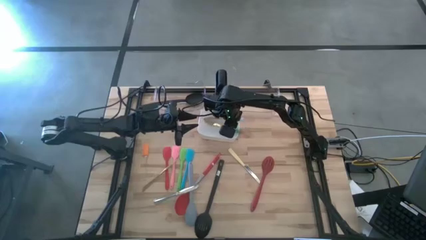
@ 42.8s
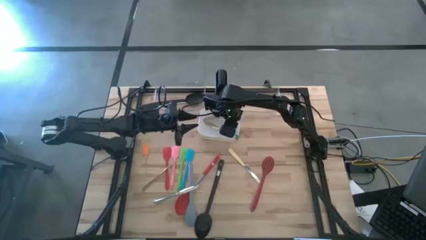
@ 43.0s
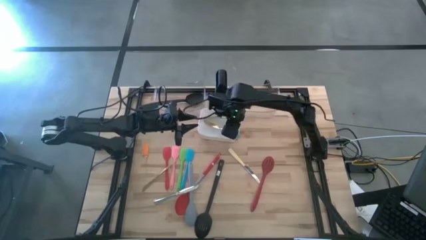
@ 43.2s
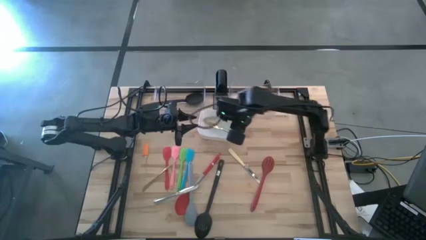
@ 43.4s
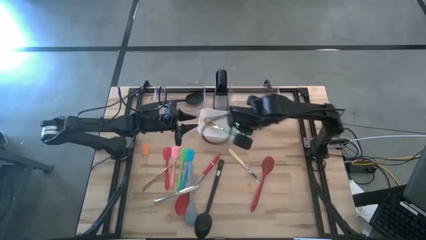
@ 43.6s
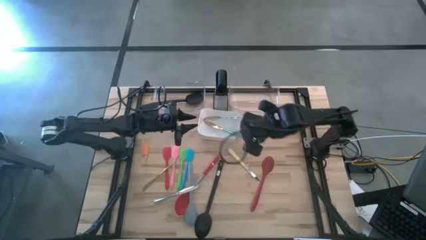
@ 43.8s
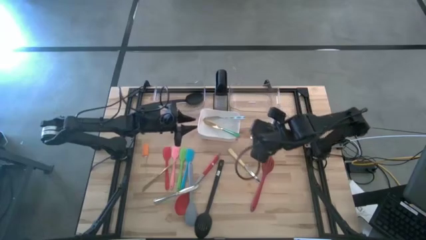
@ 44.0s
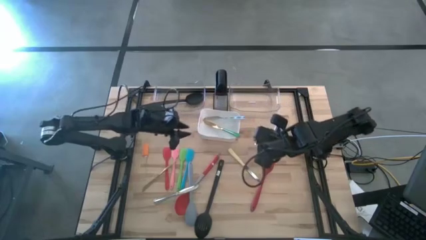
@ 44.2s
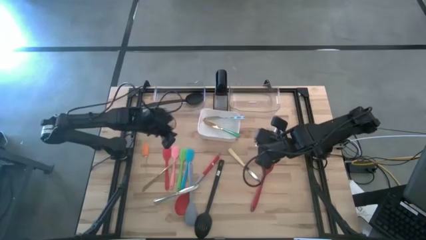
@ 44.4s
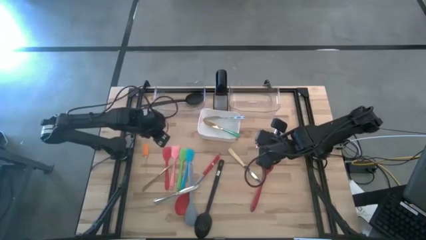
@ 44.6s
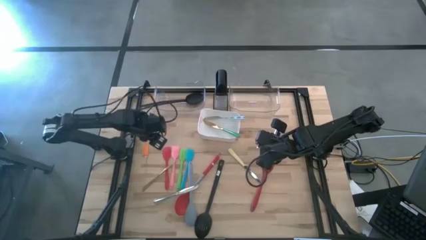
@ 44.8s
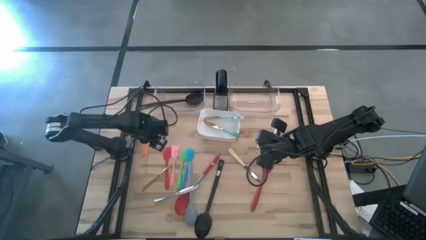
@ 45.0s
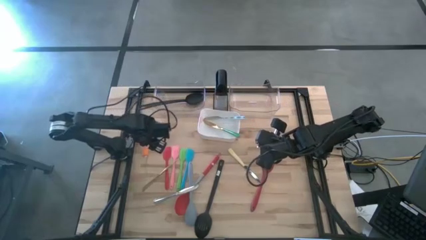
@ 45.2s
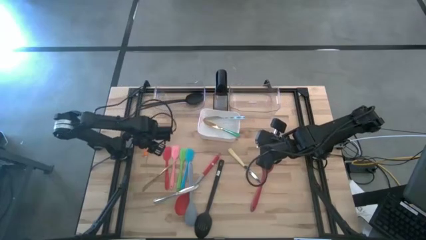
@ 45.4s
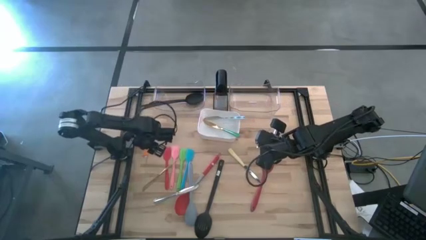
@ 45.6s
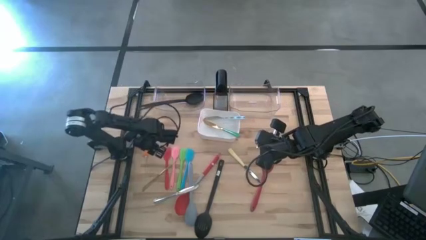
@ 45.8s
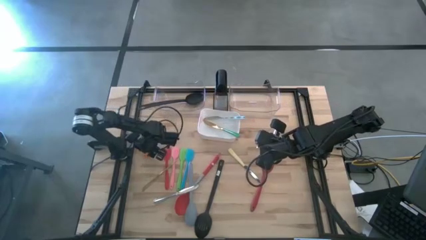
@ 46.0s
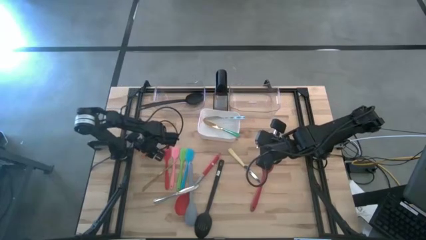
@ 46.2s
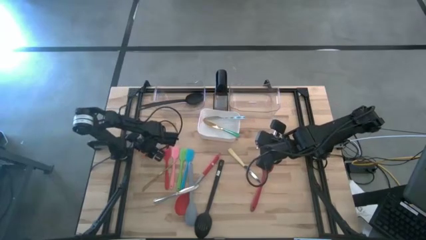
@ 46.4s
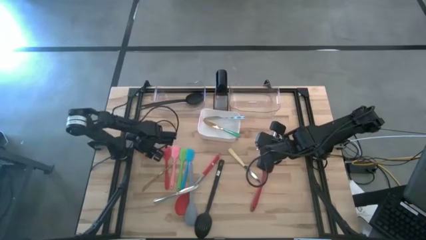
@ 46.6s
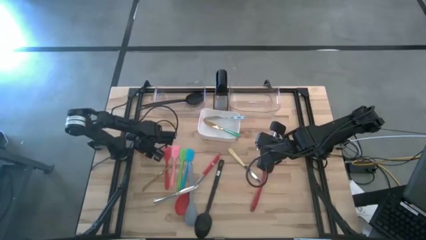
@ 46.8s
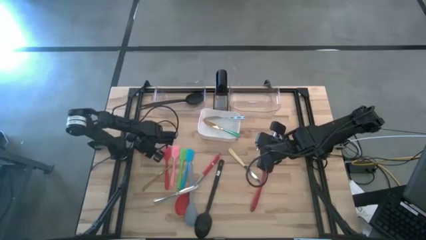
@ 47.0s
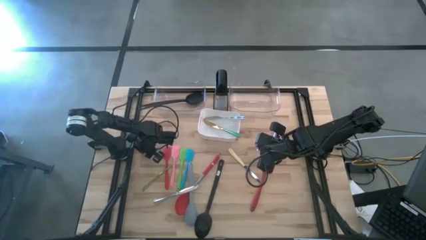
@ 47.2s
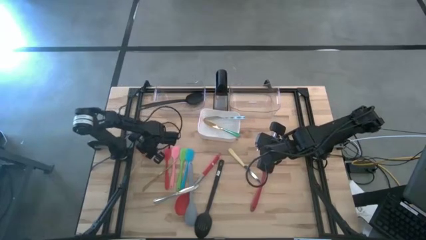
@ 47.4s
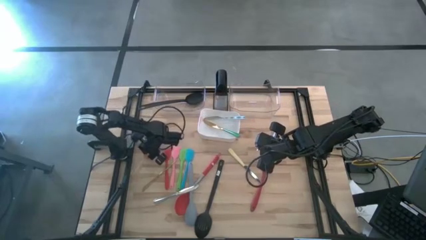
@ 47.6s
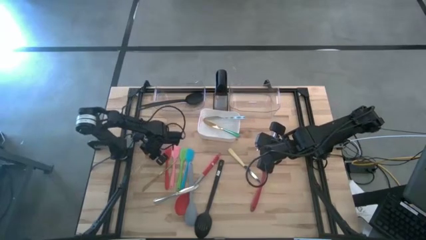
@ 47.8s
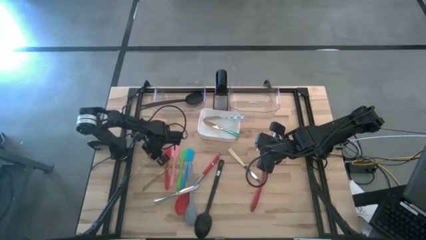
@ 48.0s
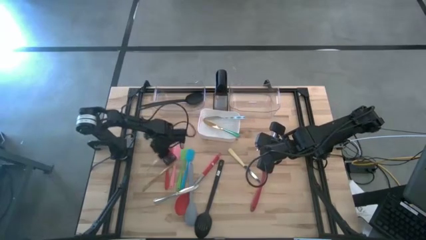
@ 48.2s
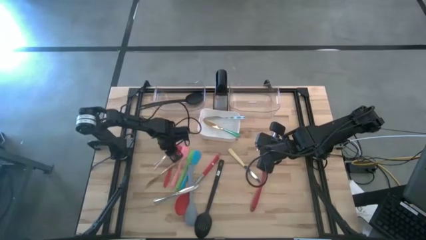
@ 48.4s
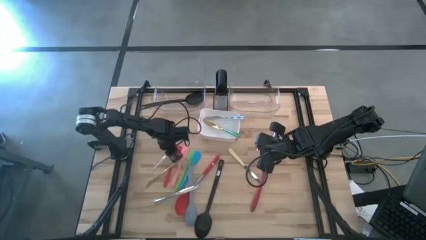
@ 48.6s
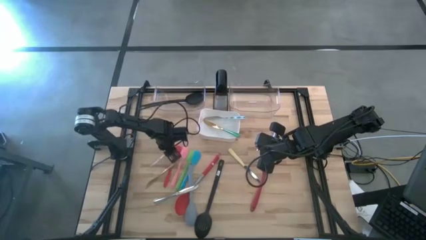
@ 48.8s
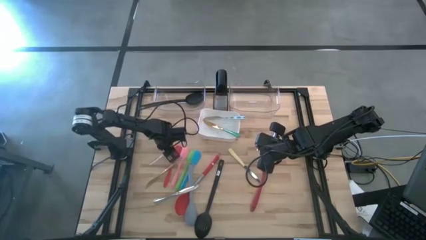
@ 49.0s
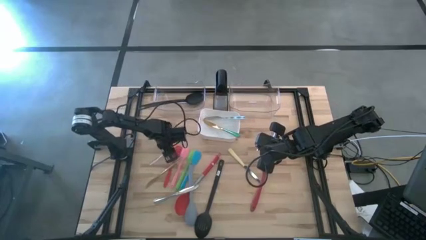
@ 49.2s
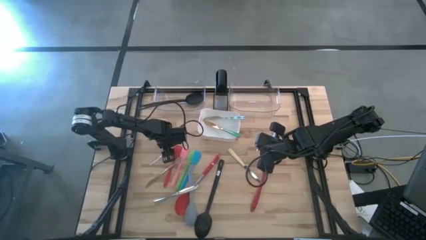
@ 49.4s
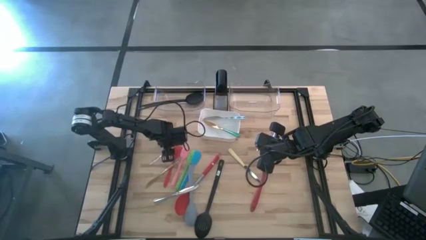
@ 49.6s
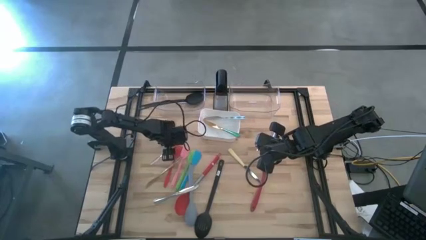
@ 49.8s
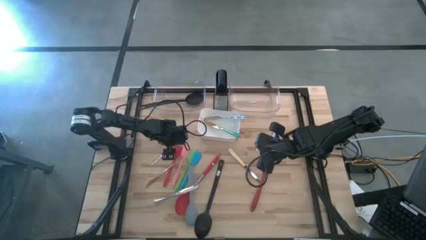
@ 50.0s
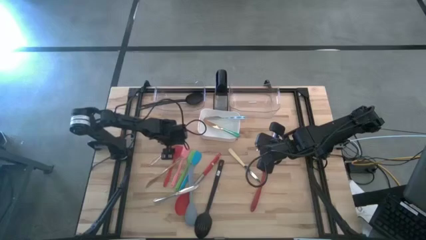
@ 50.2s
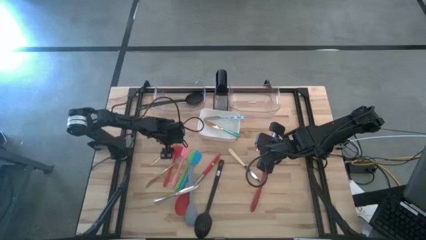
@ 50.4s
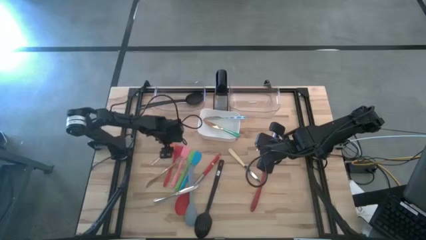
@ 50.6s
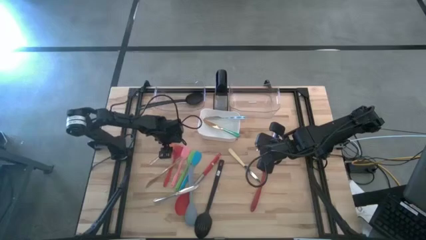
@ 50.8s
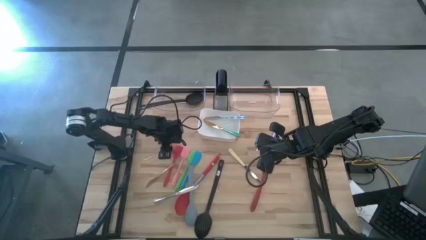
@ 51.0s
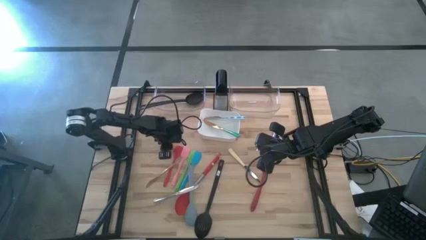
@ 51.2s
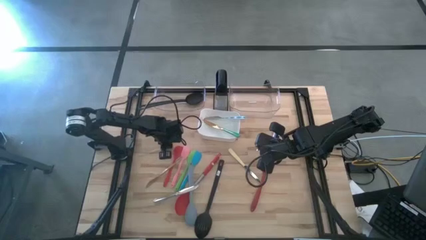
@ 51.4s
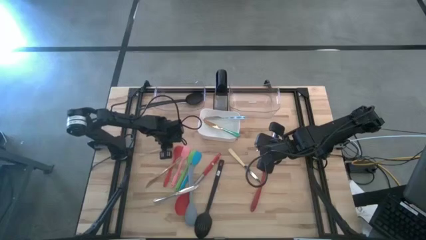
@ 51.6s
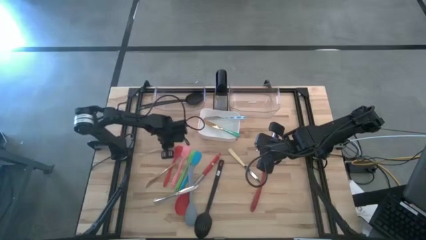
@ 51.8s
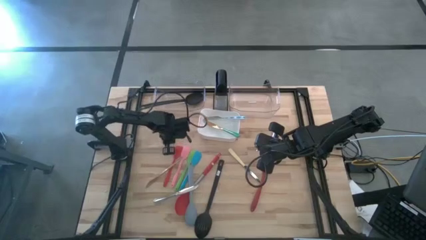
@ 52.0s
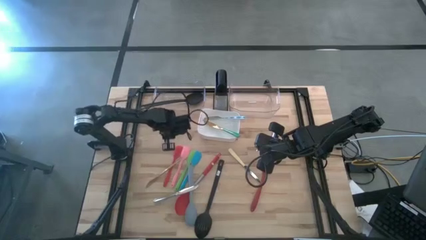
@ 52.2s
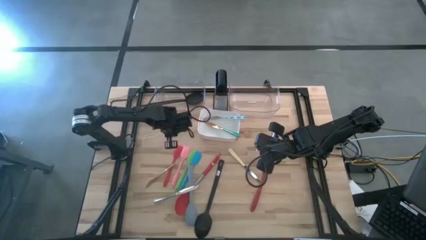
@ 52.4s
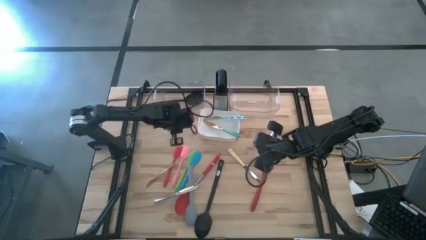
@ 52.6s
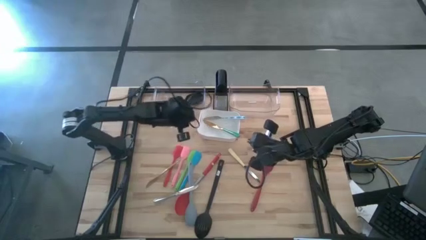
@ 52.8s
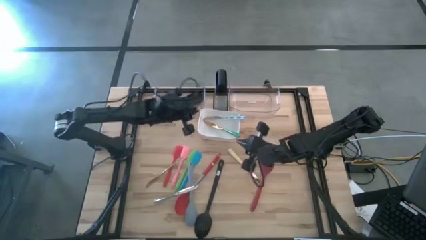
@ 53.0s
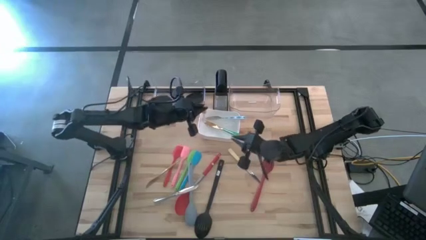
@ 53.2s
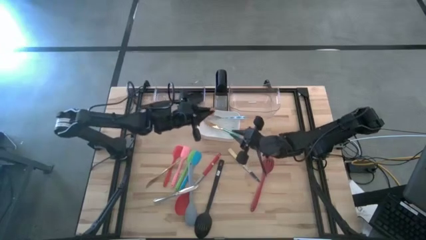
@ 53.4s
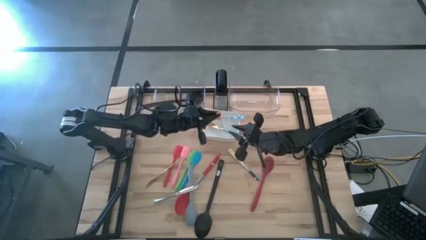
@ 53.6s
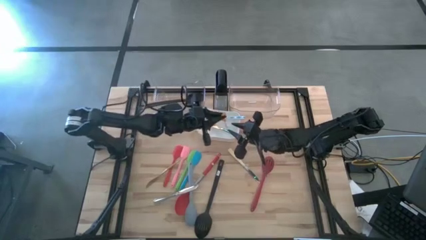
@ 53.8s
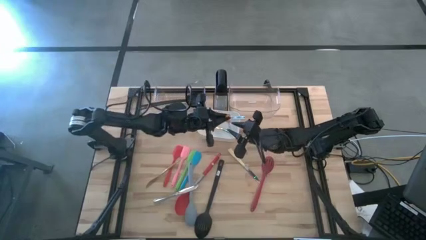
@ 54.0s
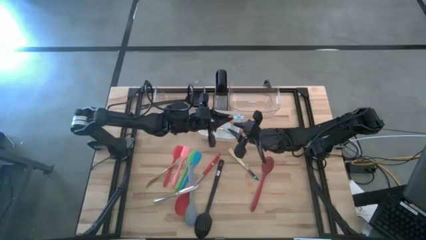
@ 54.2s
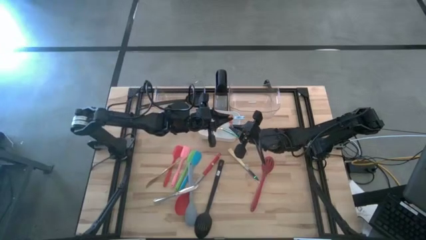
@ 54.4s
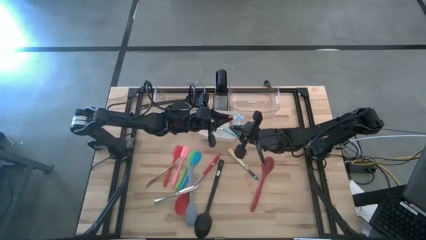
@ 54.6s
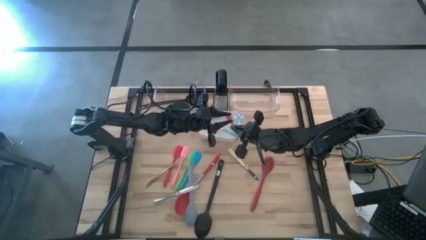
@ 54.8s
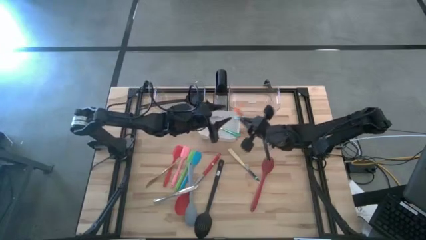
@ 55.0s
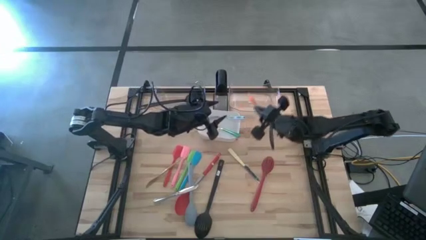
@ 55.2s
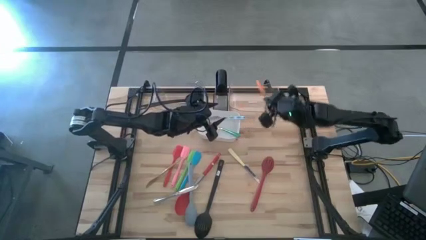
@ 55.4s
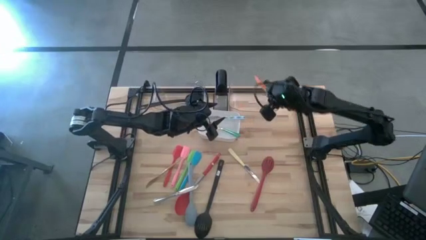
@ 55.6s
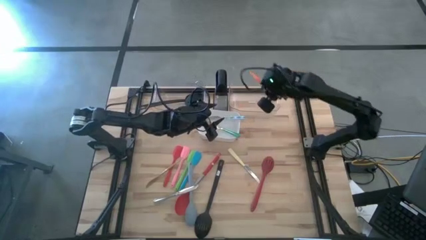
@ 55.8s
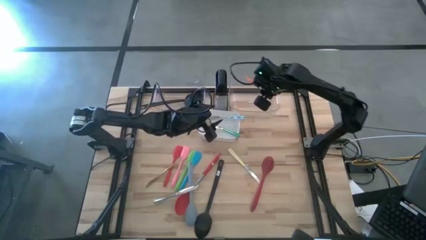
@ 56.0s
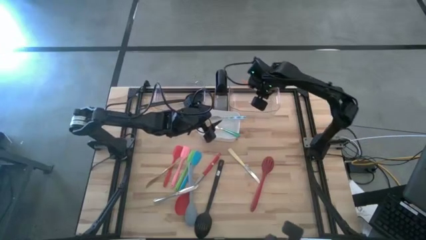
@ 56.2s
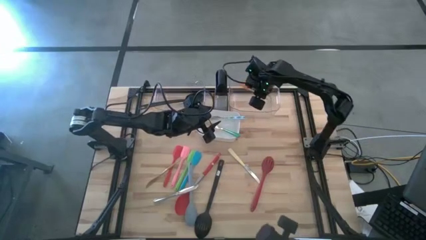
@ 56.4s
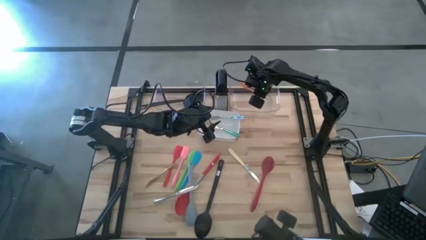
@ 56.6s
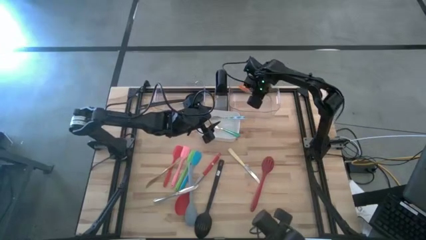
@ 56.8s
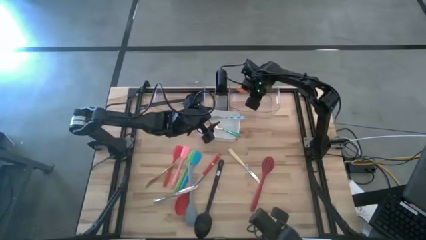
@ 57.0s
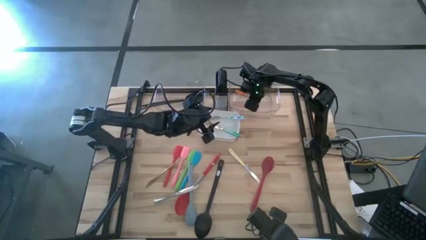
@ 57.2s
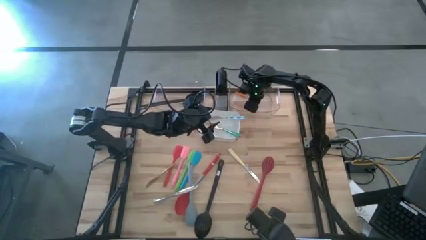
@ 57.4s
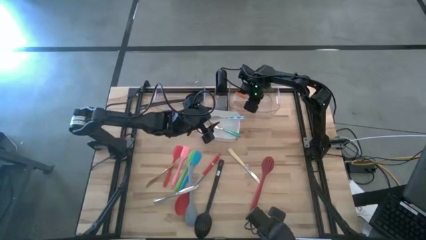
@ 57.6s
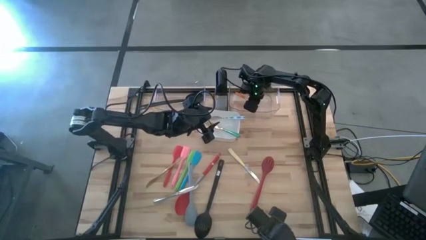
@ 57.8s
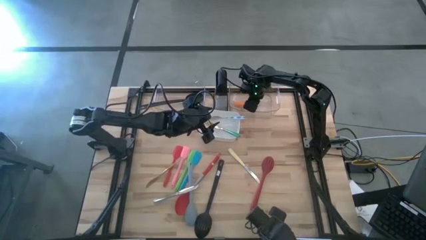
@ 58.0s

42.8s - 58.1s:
Task: Pick & Place Kitchen Items
Put the orange spatula into the right transparent bin

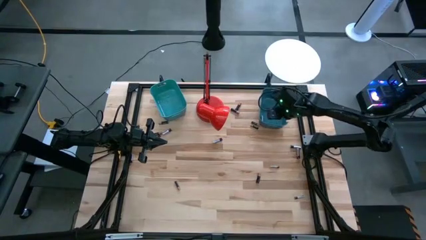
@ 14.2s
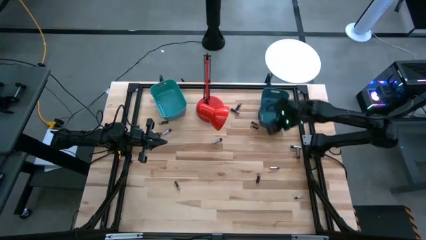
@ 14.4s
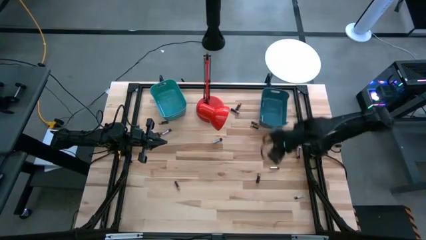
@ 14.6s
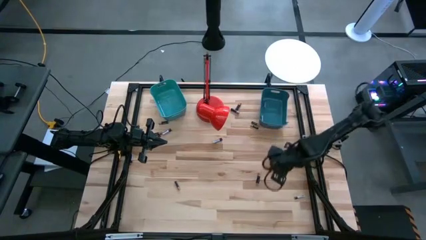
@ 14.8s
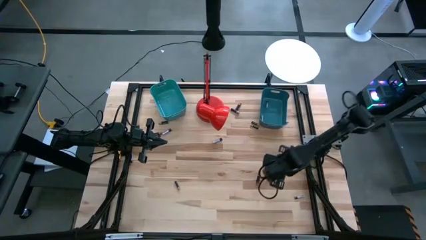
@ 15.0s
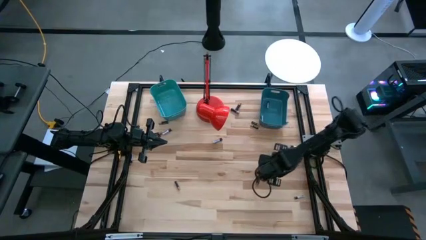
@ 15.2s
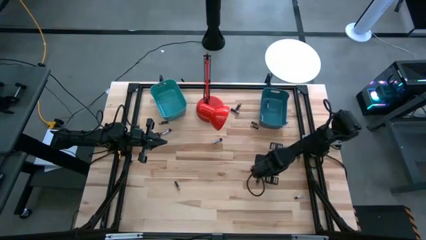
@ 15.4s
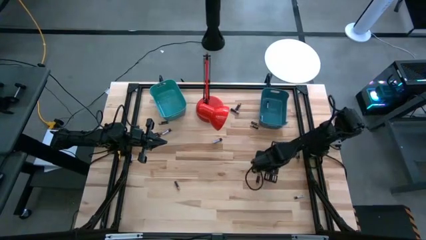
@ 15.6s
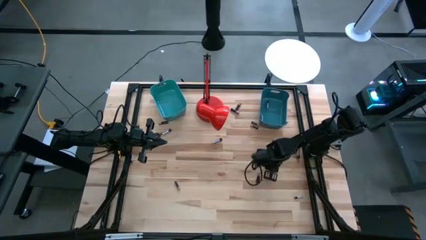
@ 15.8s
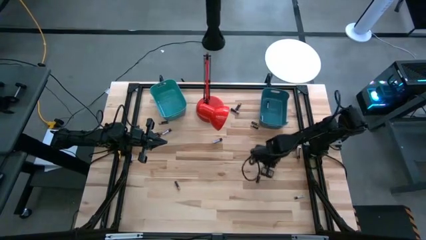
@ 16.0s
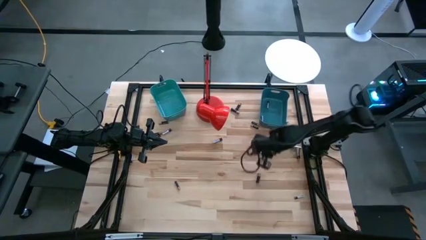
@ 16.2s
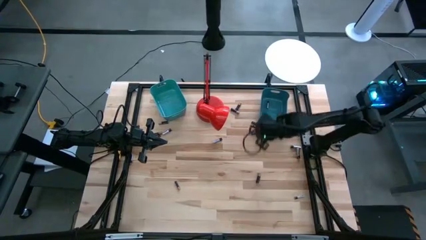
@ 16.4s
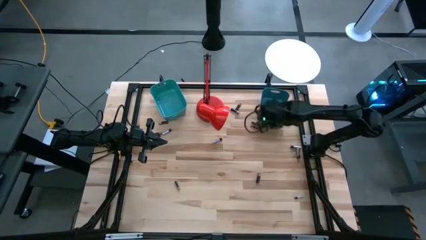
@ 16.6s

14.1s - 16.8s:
Task: Sort batteries
Put the silver battery into the blue bin
